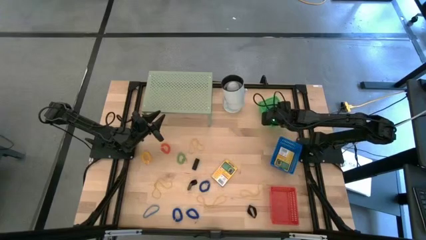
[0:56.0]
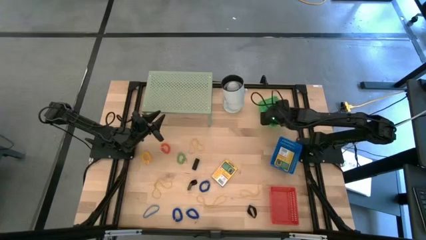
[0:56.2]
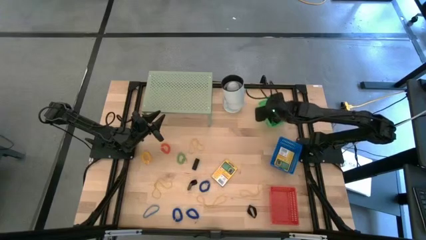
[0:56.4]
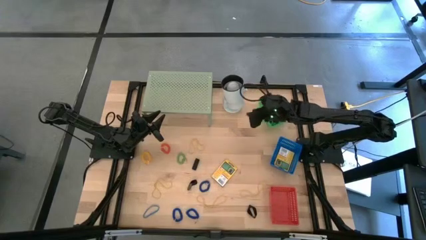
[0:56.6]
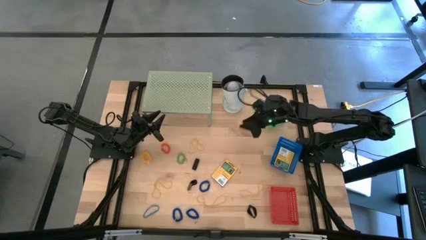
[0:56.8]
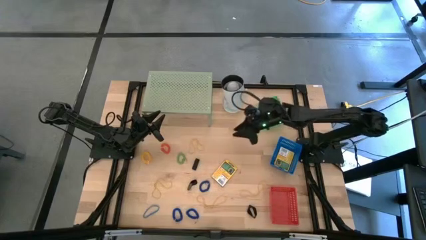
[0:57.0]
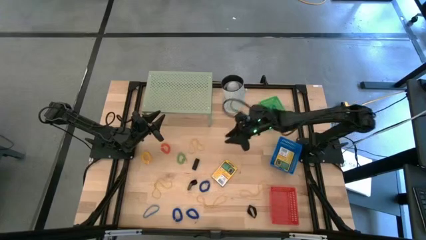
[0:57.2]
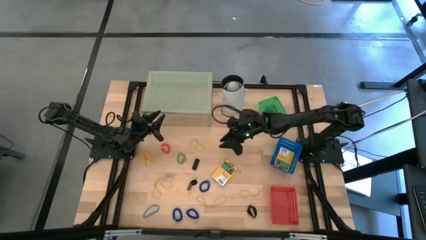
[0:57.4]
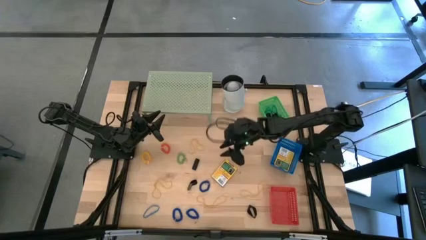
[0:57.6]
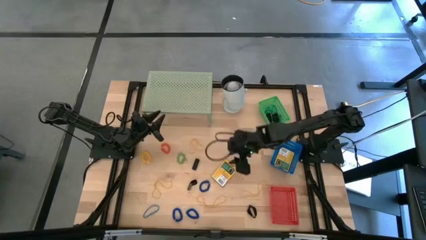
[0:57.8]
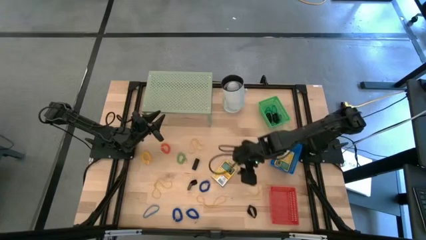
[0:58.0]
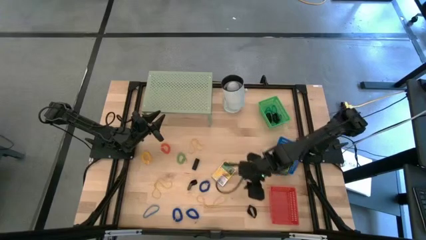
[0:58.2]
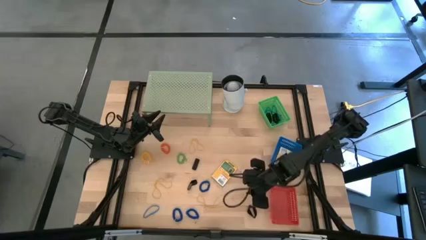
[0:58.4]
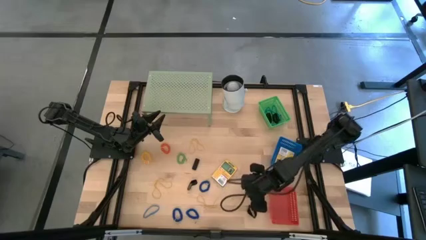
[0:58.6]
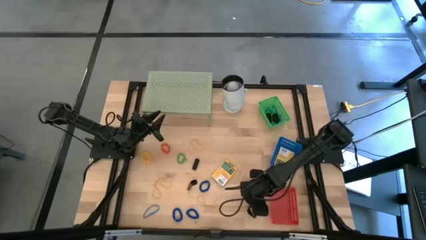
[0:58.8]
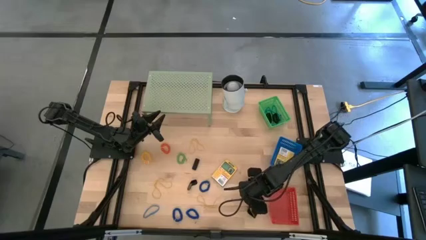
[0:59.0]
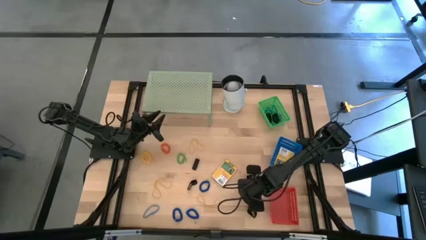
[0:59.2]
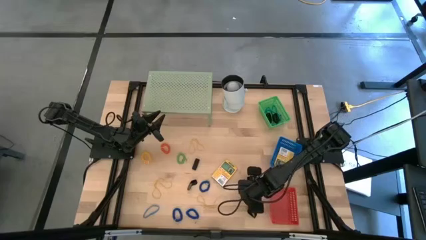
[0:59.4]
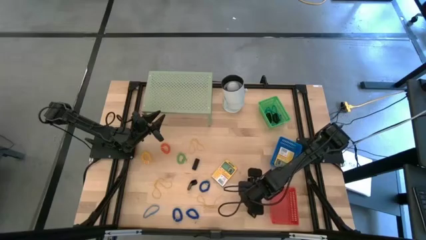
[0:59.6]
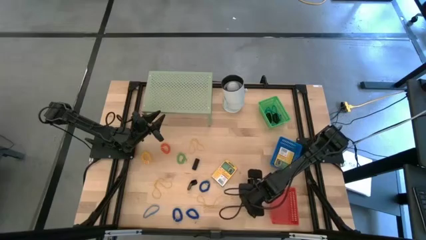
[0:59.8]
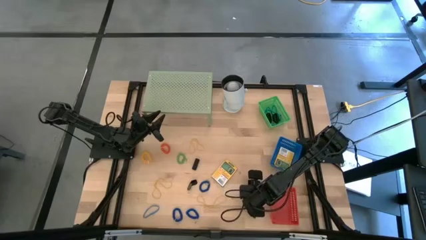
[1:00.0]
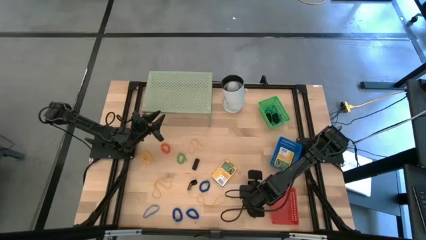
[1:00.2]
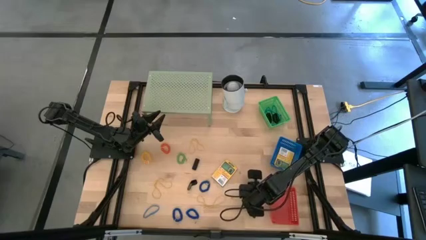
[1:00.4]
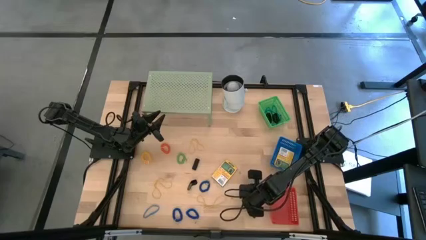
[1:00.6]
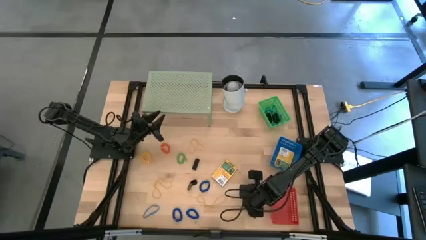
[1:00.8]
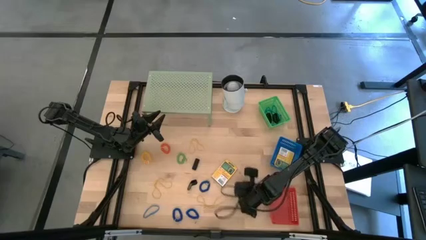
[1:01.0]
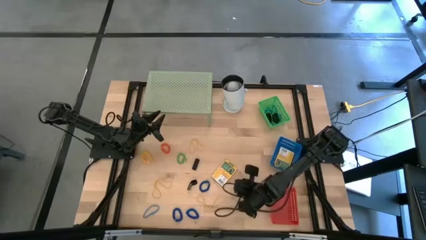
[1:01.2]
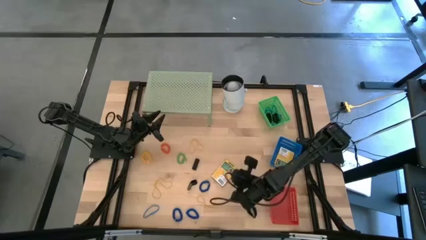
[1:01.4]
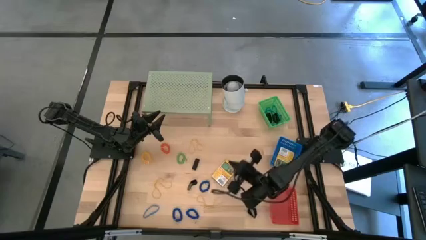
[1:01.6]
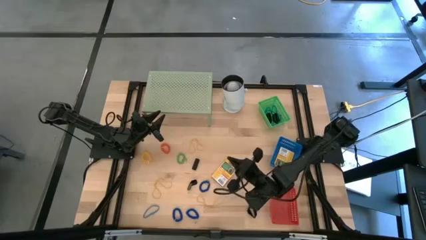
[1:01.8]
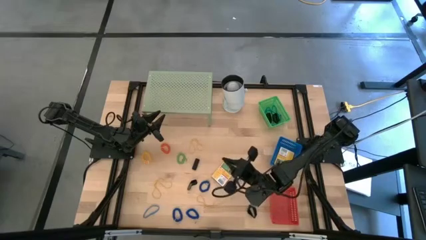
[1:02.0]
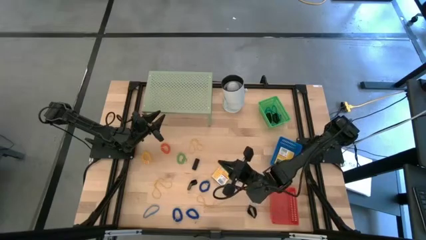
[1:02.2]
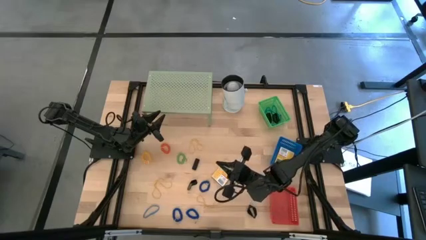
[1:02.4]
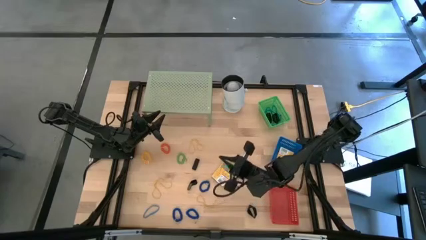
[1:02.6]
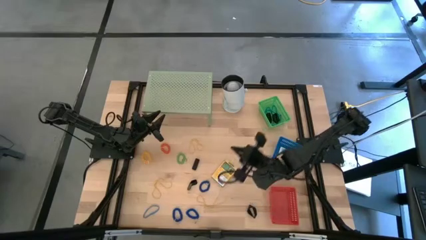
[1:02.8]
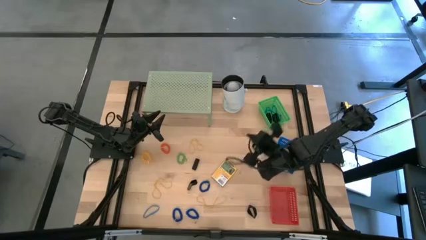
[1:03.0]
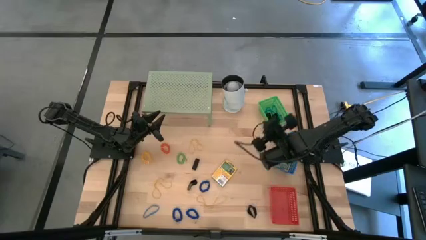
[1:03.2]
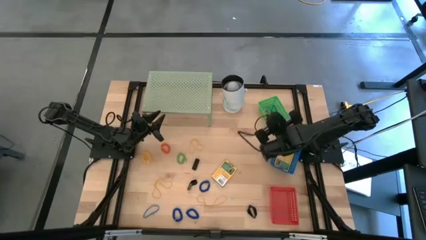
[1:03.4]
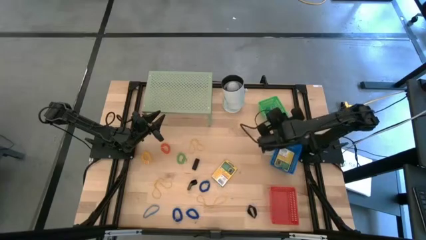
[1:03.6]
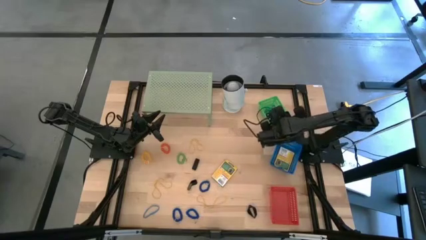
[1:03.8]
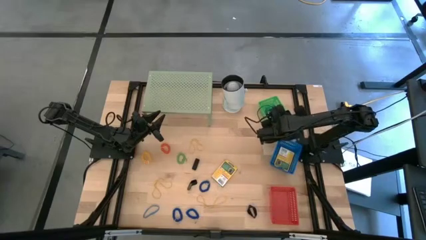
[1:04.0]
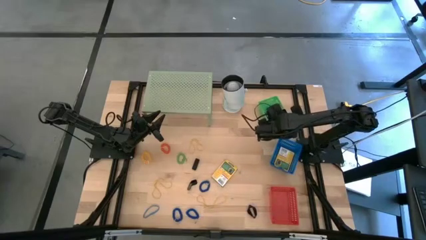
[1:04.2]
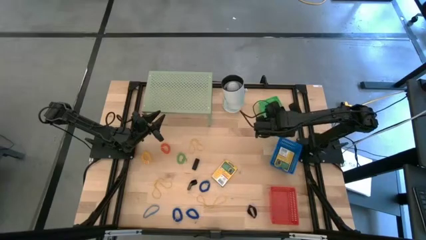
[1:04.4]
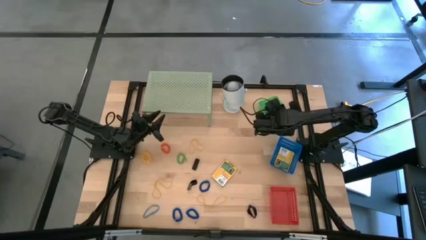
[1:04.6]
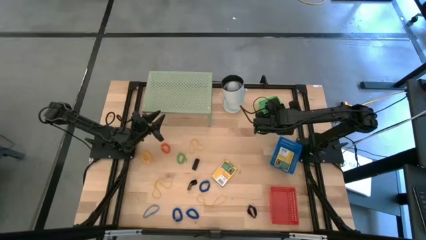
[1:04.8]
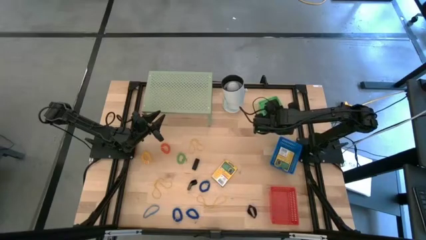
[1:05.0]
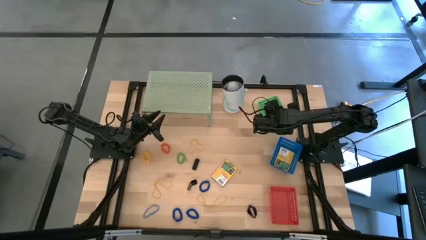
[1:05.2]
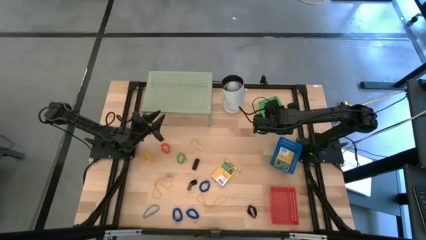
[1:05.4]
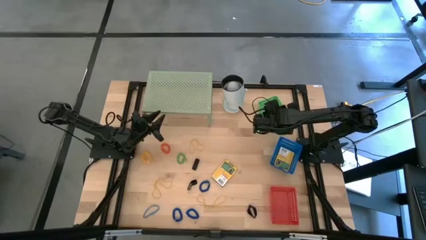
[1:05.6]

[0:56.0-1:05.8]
Task: Pick & Place Office Desk Supplies
Put the yellow rubber band into the green bin

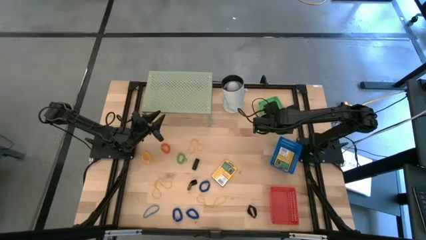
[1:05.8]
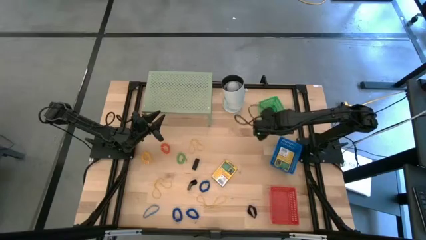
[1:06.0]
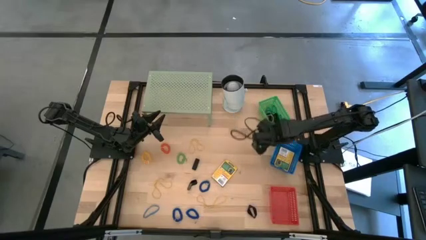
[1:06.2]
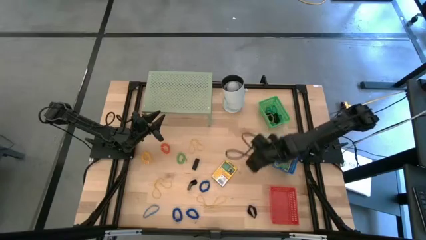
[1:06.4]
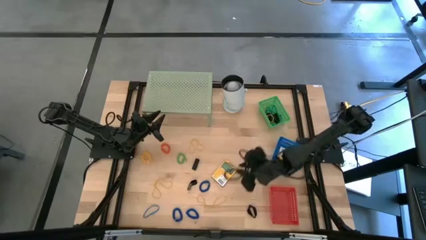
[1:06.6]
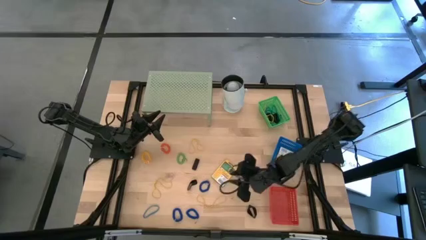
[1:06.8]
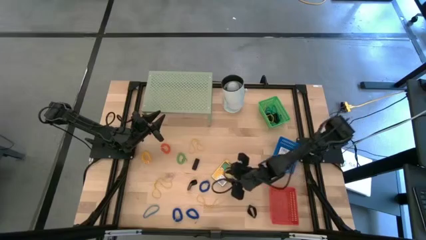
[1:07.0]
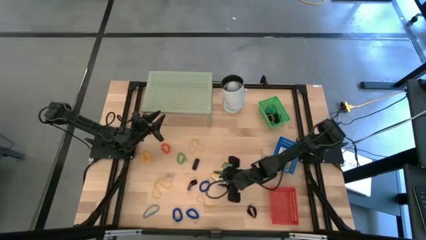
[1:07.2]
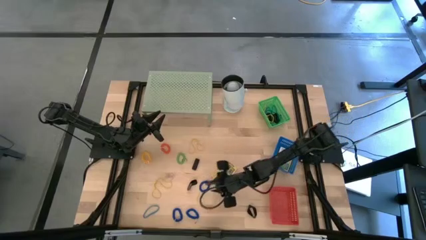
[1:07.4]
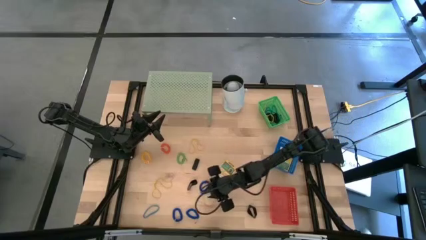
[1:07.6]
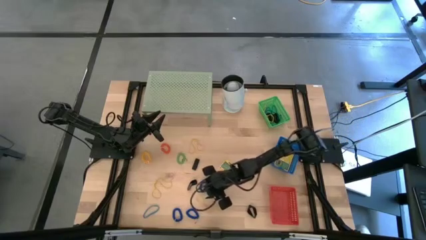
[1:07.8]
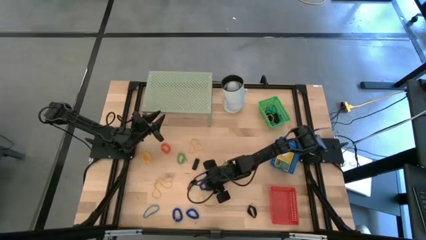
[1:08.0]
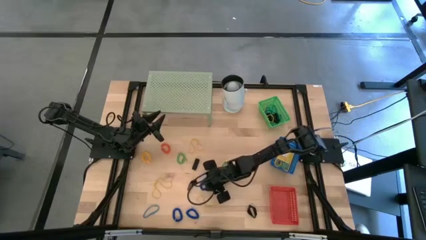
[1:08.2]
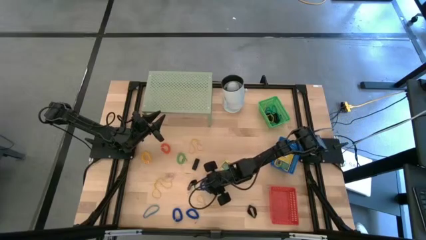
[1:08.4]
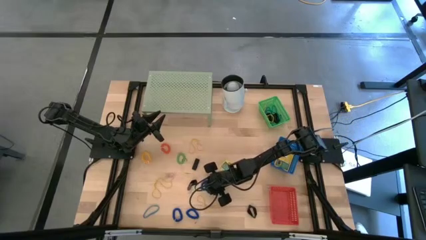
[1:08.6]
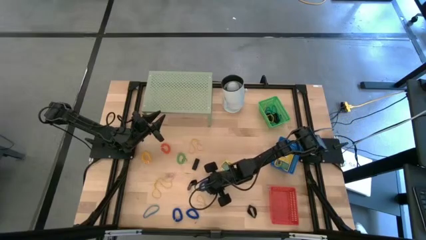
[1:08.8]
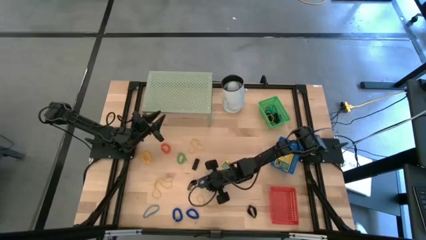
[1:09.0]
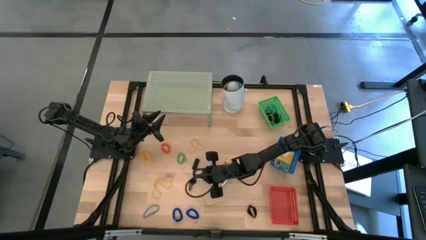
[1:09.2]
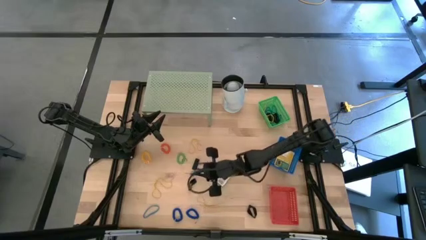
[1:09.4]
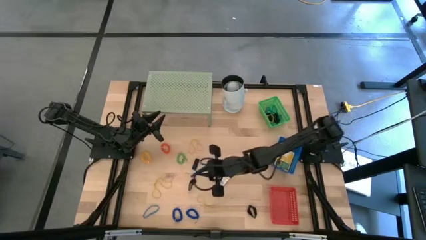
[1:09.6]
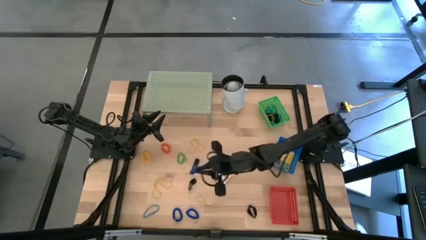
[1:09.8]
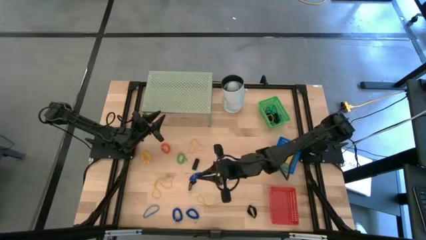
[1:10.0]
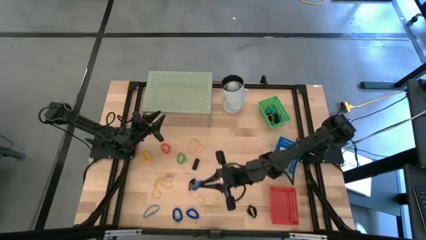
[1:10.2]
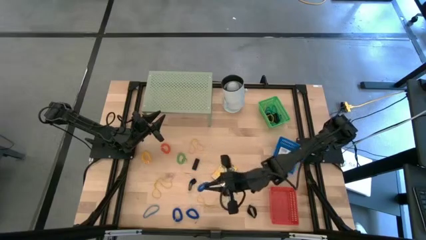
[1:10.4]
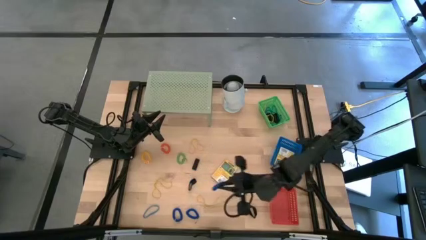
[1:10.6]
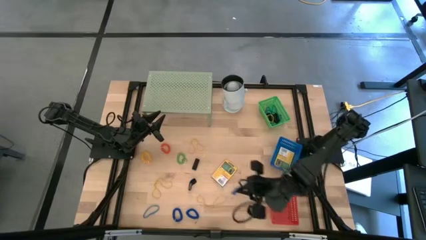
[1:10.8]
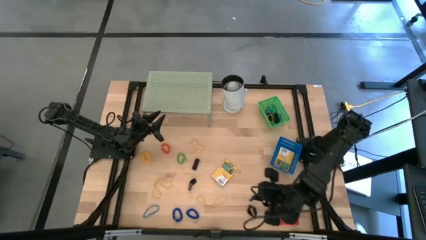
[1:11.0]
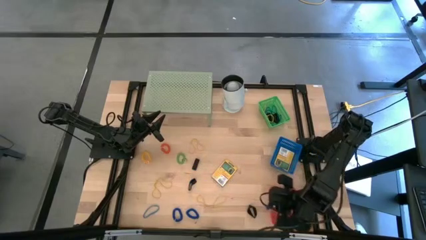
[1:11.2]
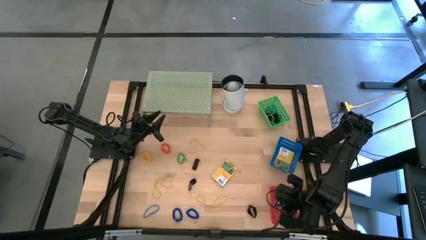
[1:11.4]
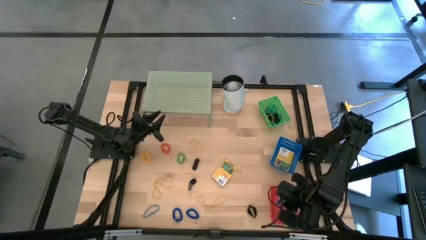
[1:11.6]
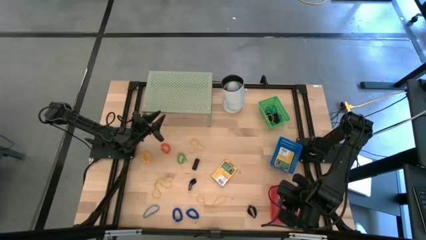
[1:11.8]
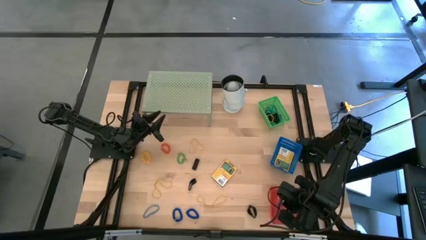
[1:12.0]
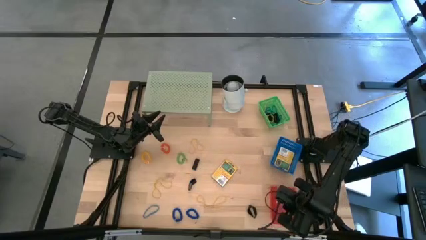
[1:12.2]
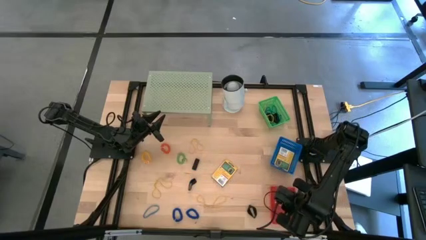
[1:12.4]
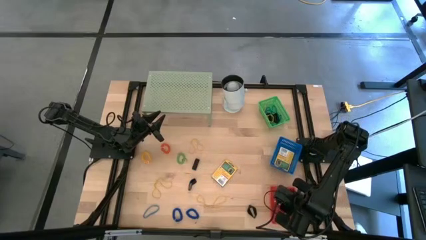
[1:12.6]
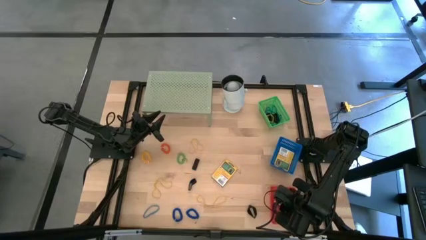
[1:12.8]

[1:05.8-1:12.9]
Put the blue spiral keychain into the red bin
